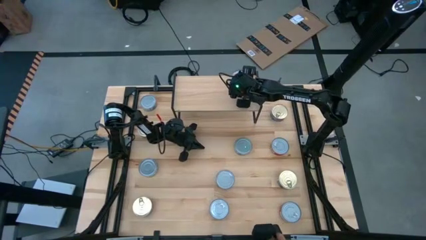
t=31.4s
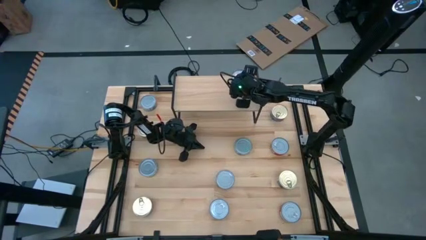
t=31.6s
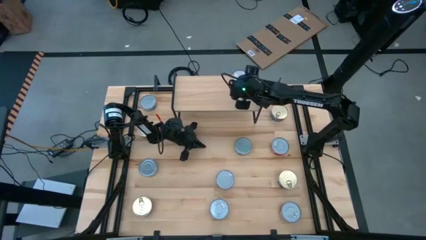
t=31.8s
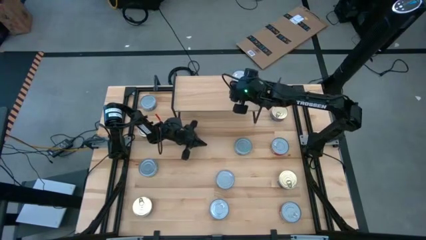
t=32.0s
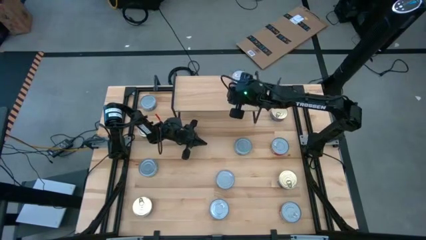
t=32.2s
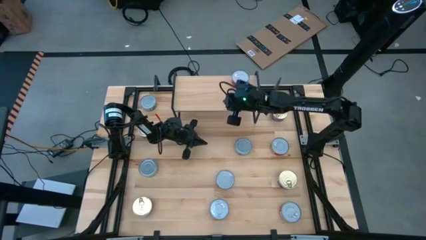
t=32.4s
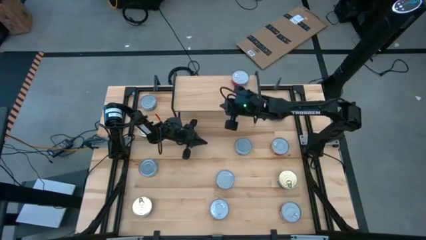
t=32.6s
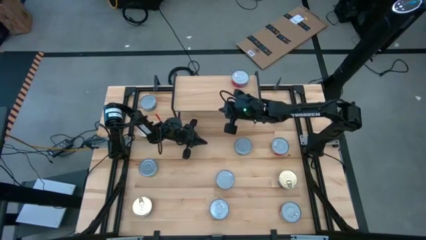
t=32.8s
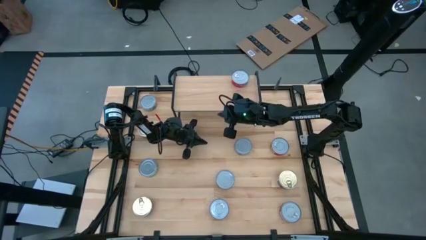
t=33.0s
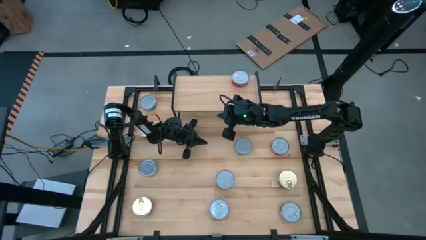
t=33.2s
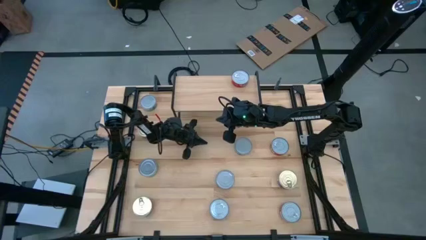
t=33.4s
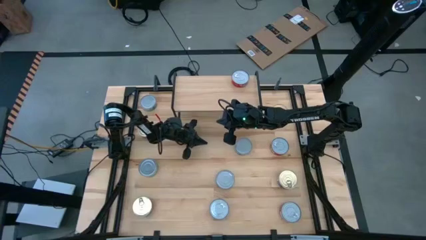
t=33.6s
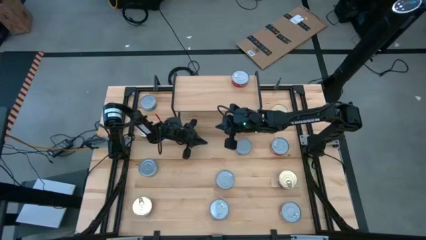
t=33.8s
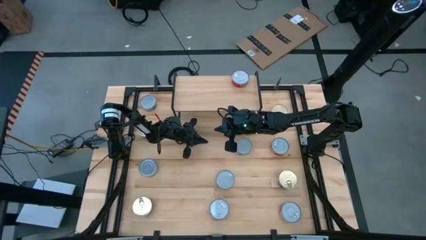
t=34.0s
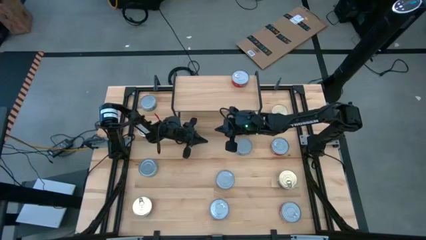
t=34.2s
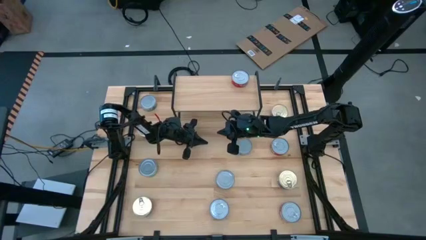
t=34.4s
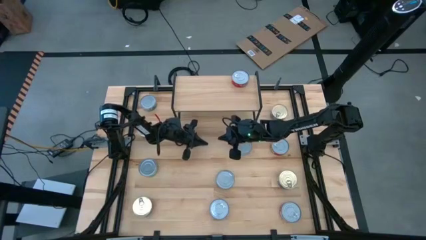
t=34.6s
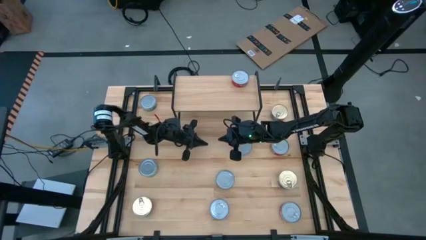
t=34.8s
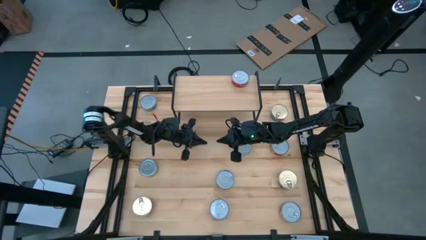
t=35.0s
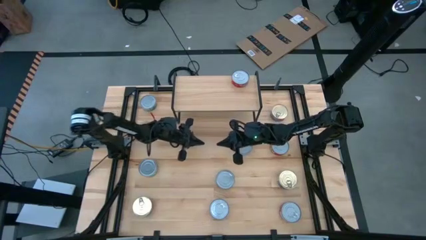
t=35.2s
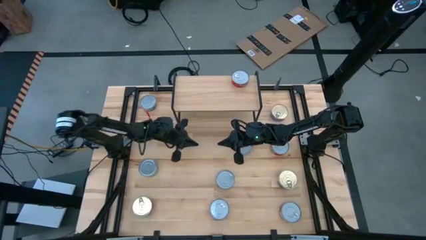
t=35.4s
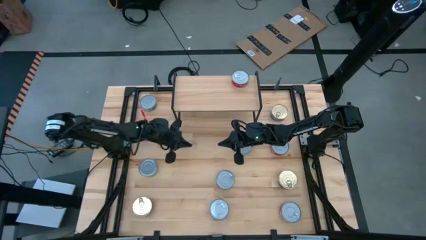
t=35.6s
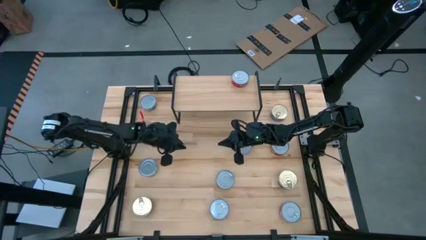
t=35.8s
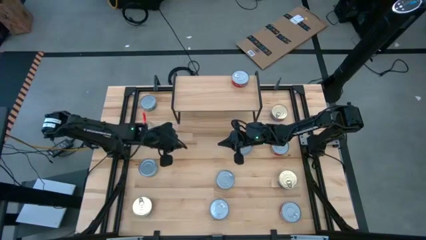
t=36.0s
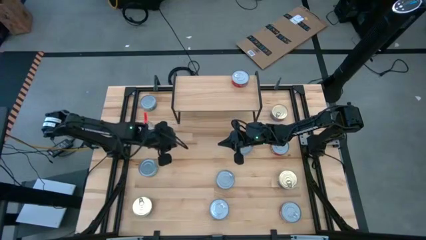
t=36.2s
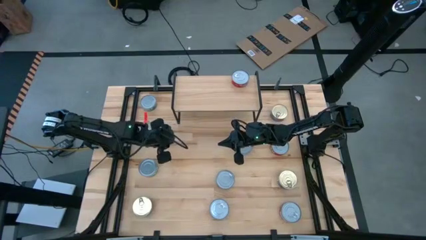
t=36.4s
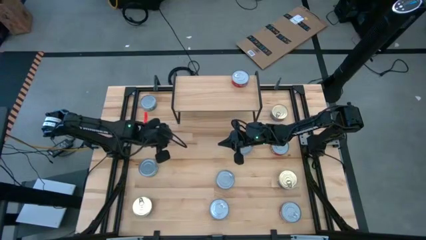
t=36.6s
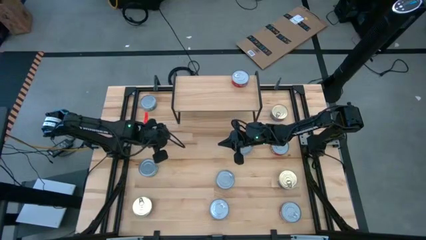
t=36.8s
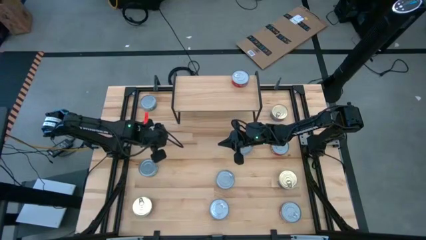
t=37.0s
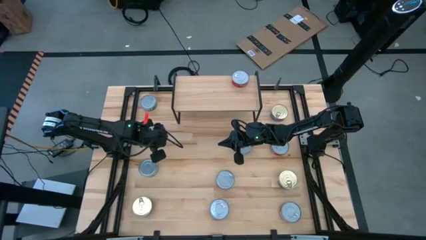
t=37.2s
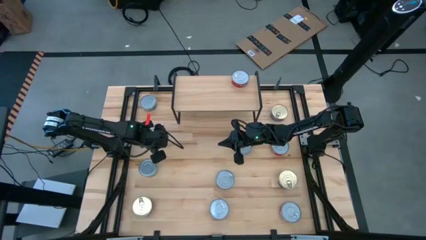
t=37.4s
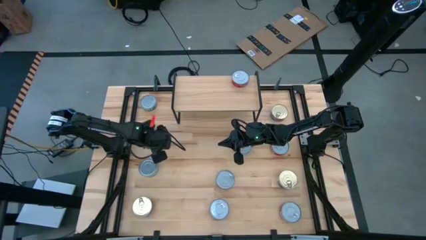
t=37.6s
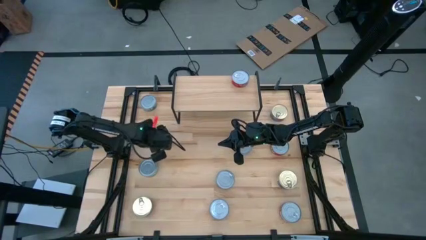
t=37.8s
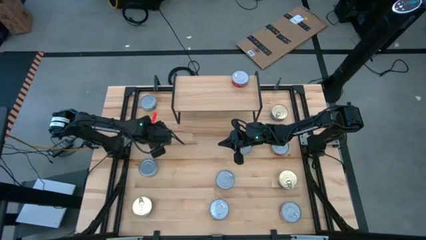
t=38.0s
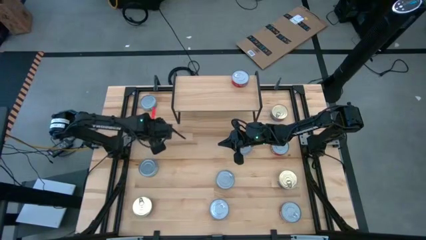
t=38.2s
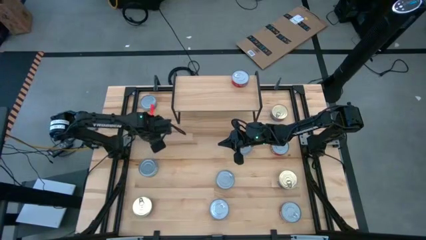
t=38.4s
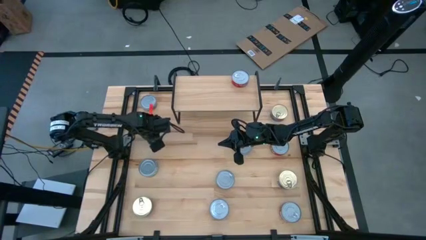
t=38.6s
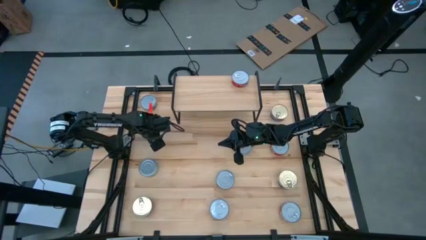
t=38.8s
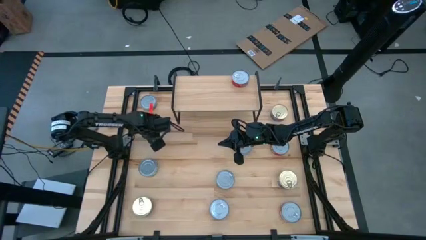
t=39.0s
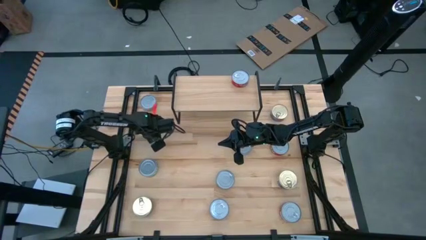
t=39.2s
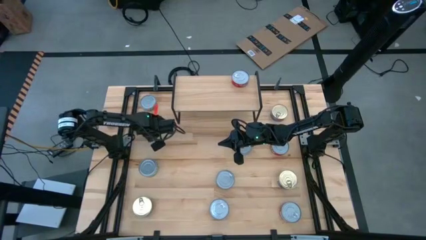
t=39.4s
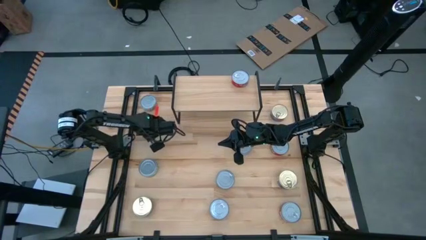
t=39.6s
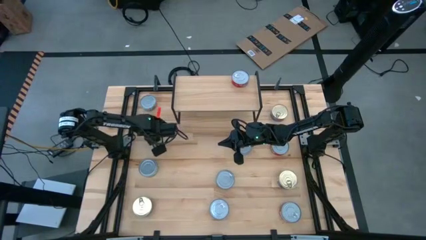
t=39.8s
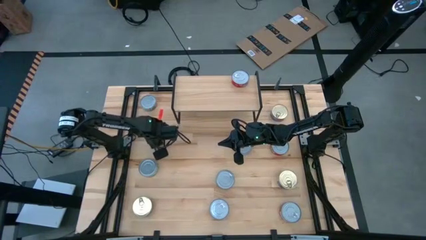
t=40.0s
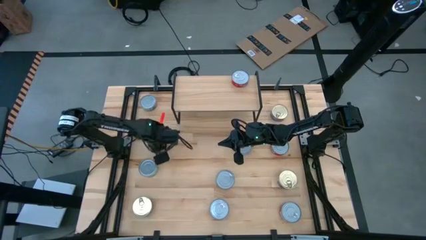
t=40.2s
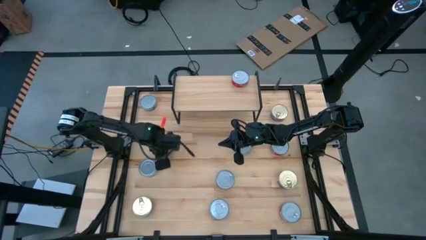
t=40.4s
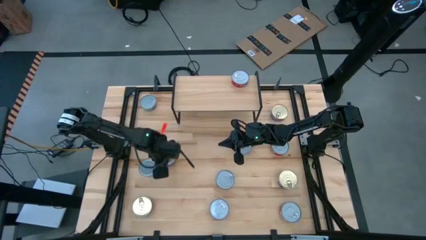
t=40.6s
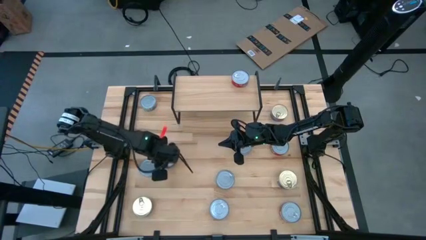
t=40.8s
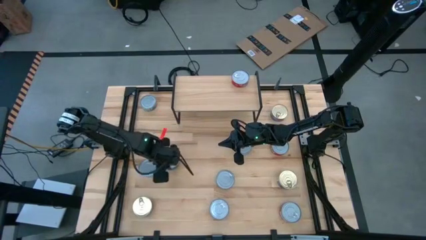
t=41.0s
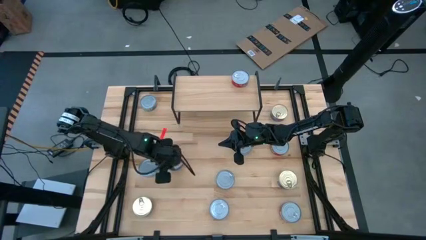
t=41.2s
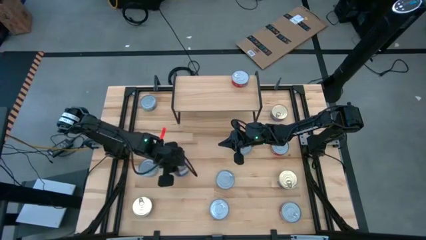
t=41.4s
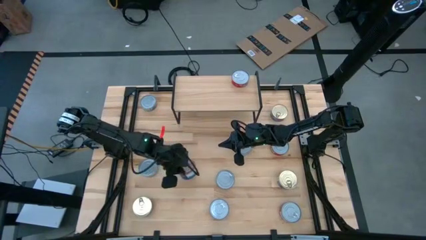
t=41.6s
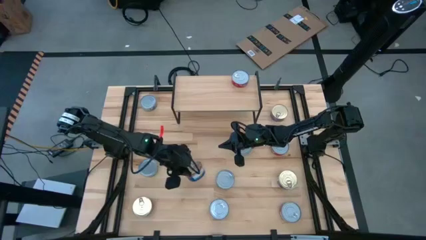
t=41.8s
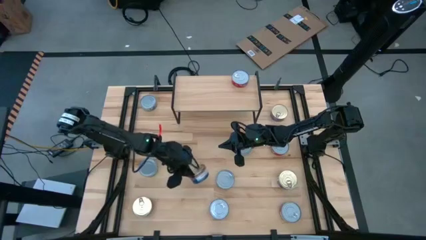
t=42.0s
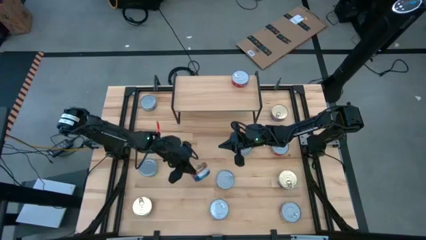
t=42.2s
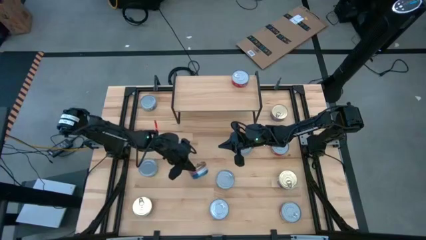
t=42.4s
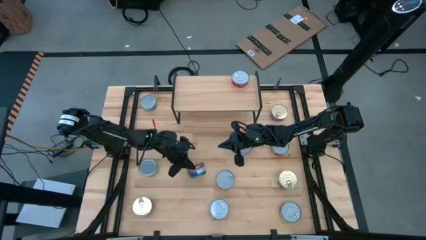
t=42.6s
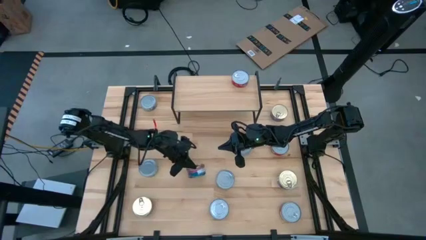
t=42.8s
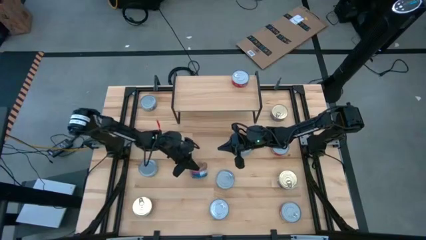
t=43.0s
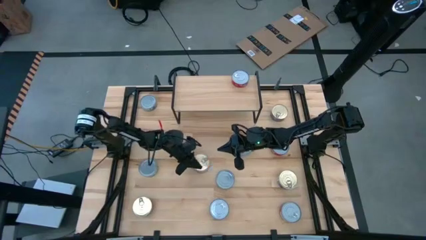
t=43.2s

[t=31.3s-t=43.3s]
Task: Stack canned seafood by type on shelf
Put the blue pink tuna can on the shelf

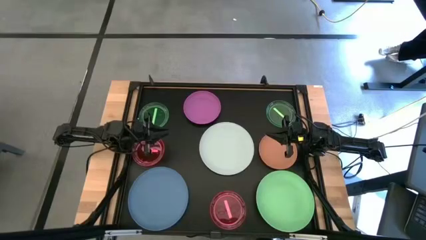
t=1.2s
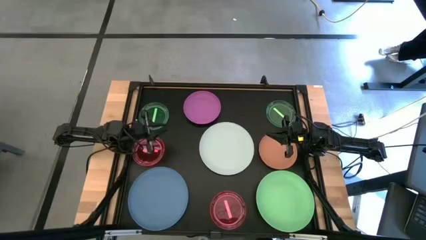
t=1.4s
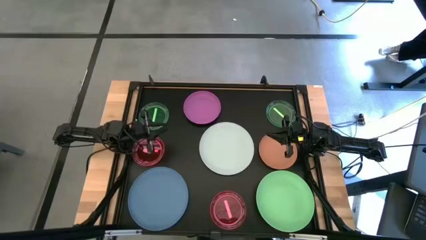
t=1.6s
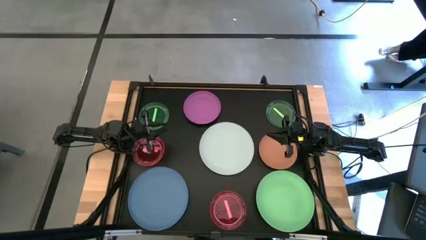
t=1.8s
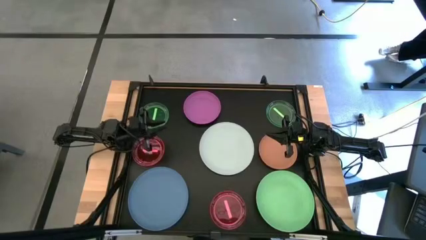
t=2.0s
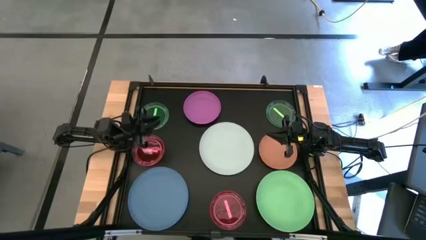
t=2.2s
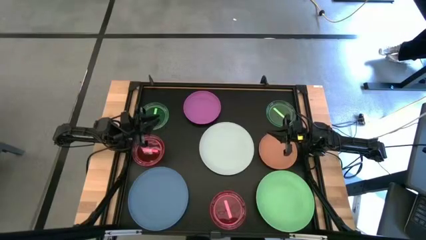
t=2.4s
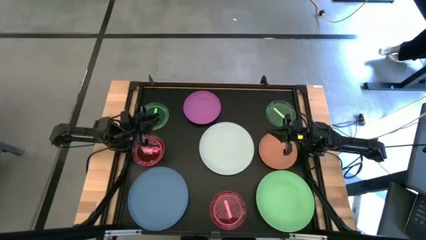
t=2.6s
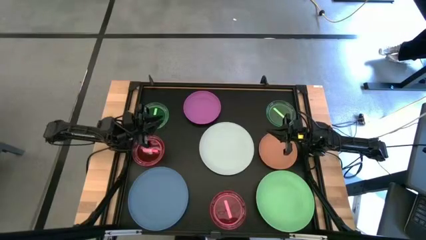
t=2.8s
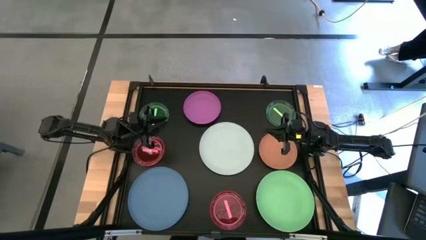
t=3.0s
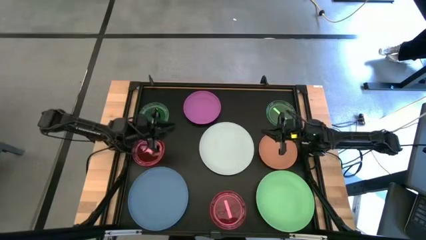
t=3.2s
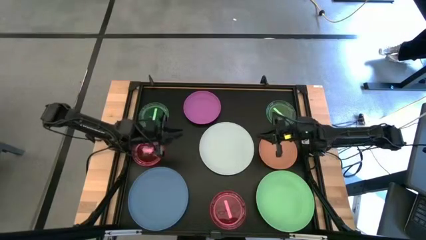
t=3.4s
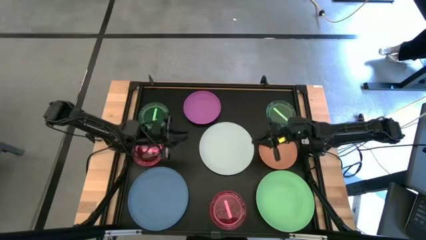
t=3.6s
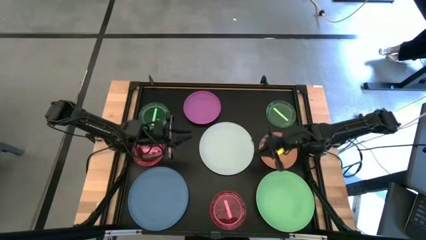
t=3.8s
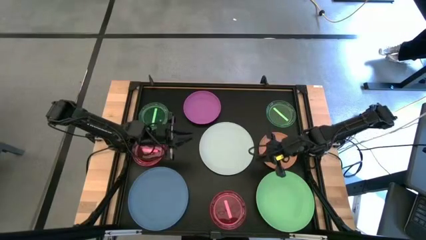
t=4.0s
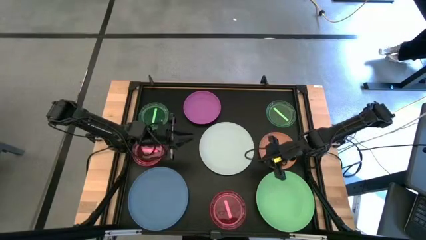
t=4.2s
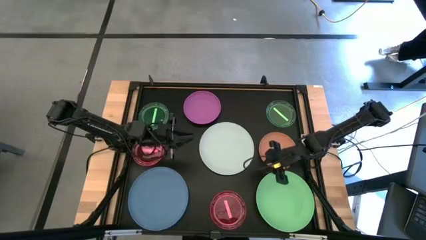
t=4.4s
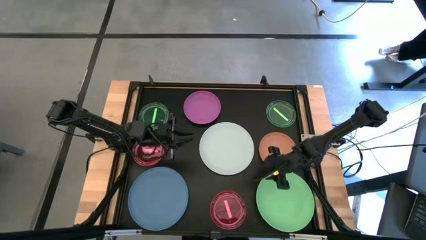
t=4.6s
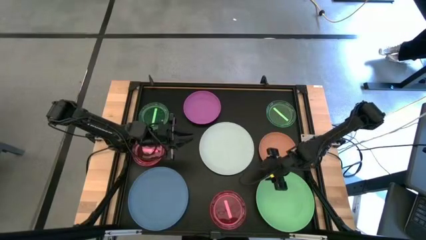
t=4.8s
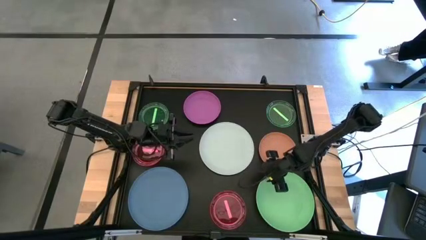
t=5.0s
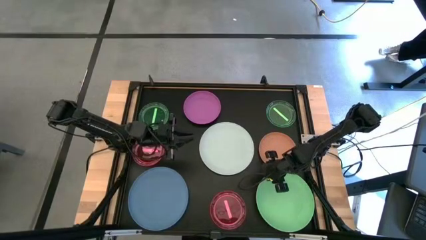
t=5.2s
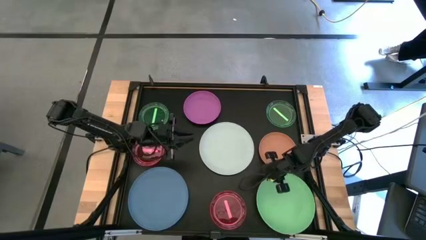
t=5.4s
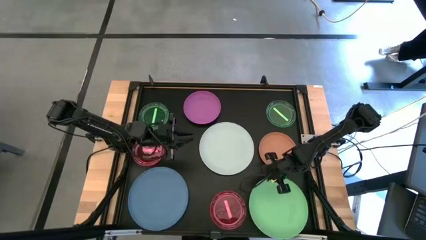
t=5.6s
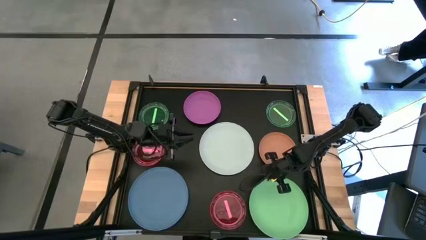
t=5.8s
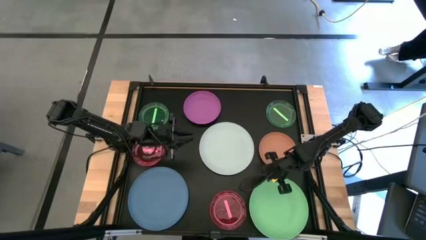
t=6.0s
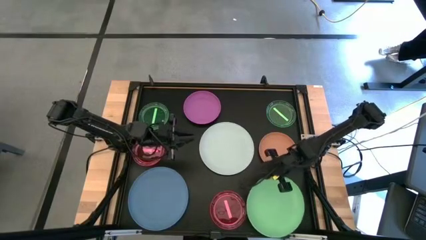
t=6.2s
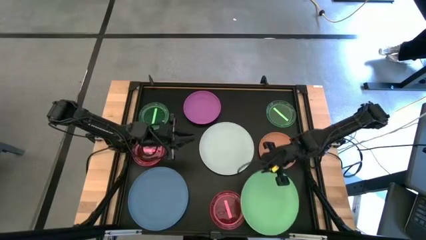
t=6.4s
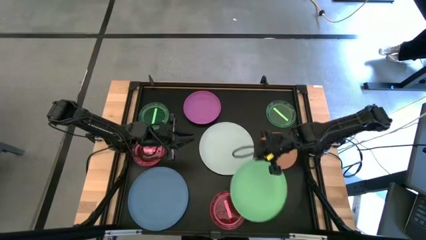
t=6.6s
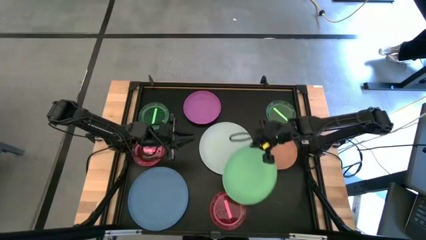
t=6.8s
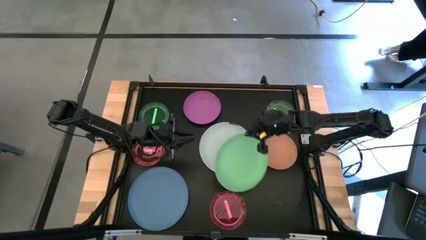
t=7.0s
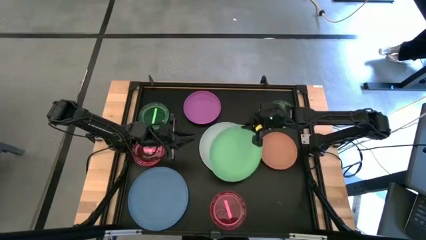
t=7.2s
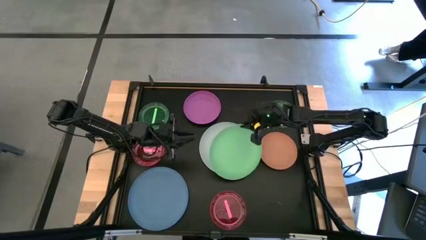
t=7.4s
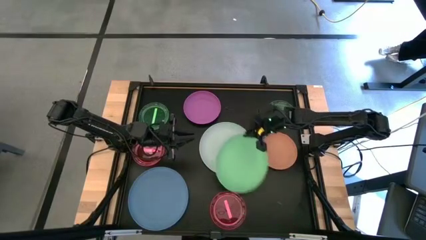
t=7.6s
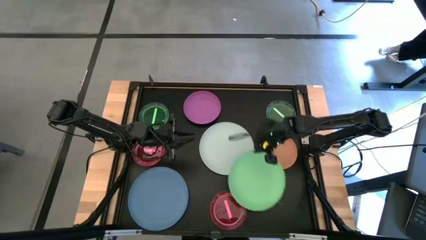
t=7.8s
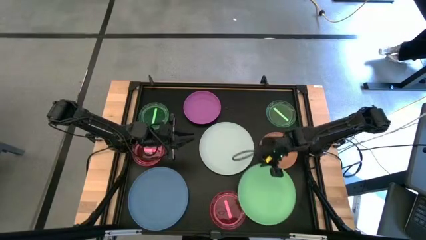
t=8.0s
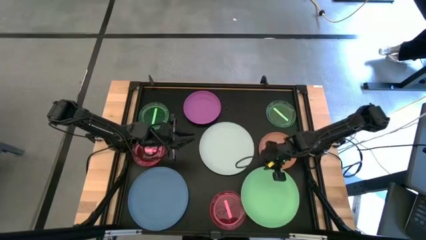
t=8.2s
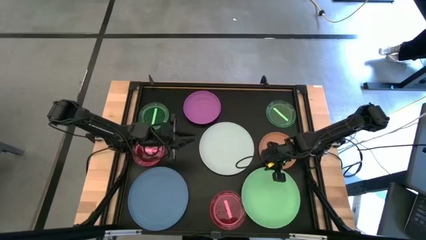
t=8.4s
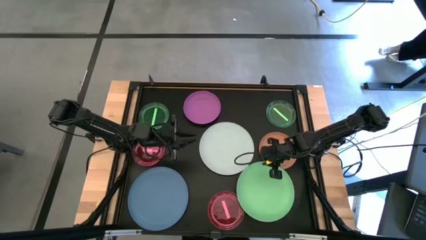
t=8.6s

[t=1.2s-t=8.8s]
Task: Stack plastic plates
Stack the big green plate on the big white plate
